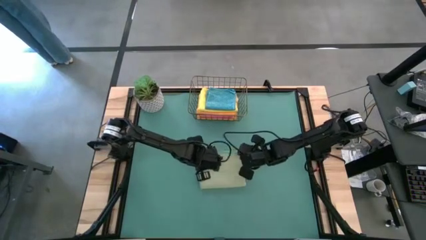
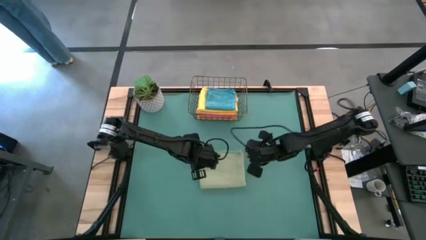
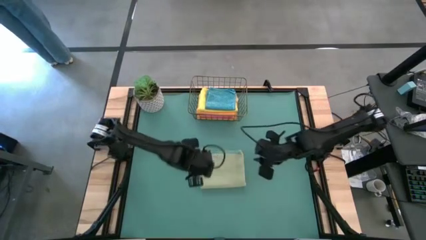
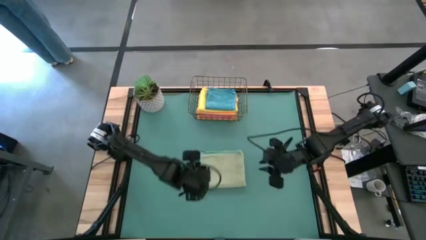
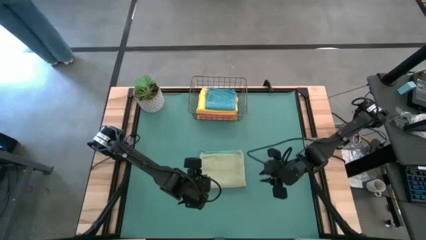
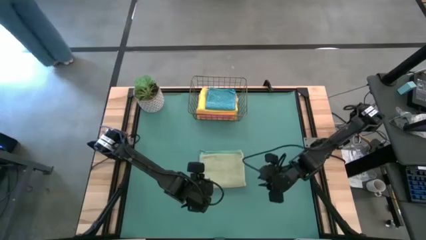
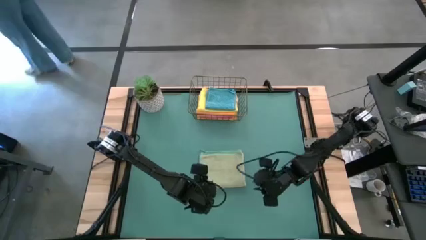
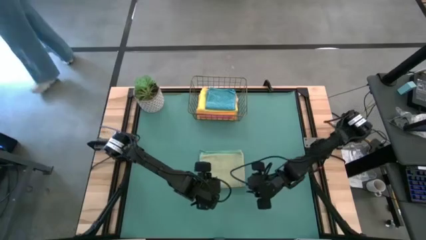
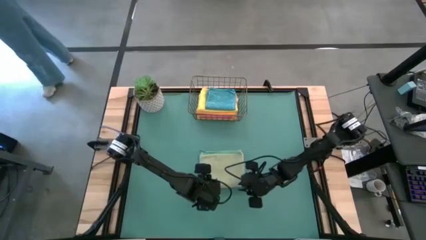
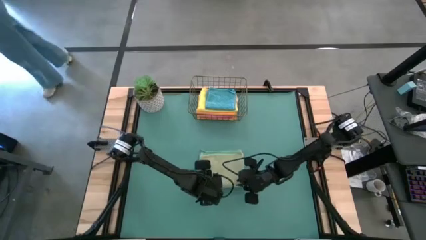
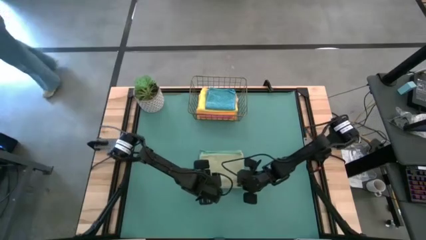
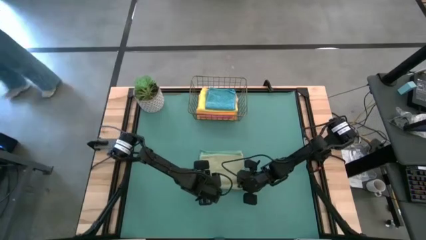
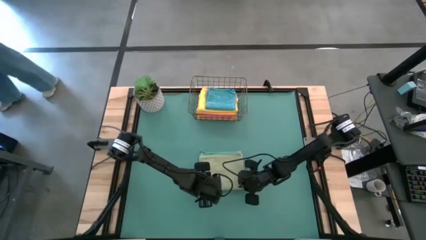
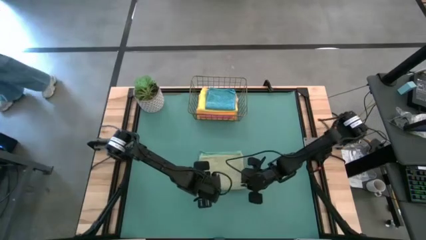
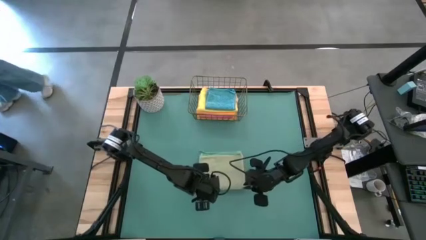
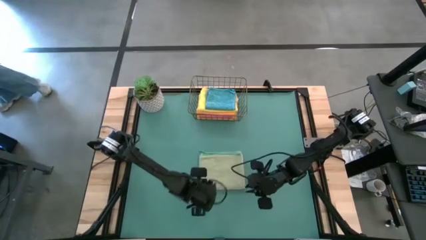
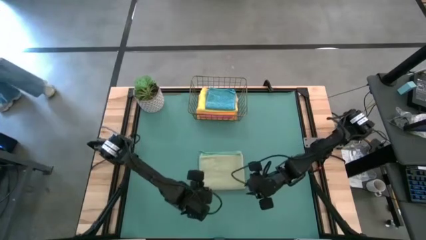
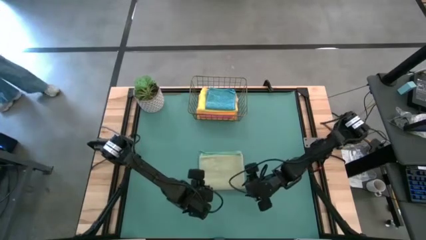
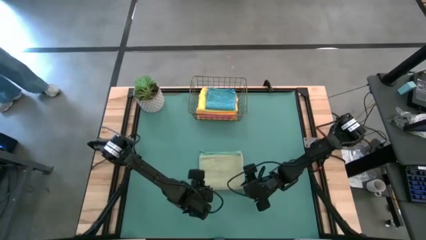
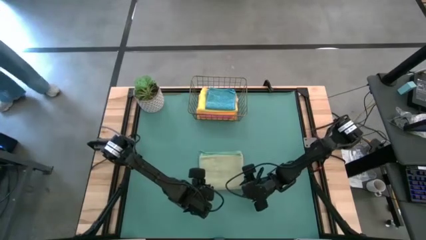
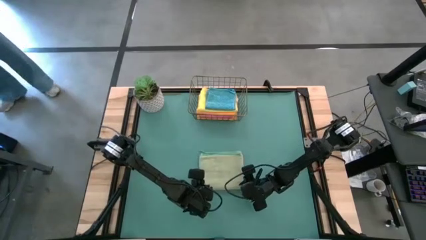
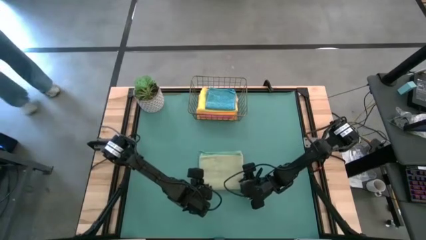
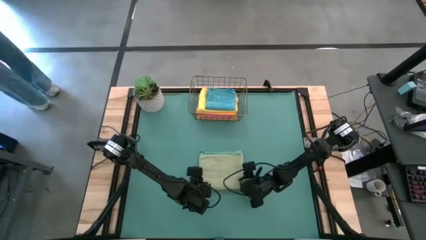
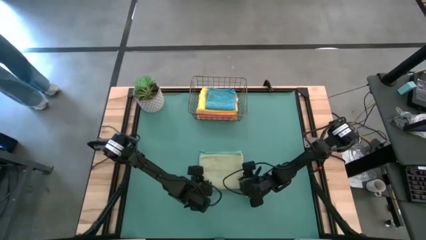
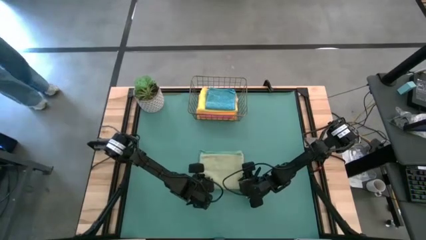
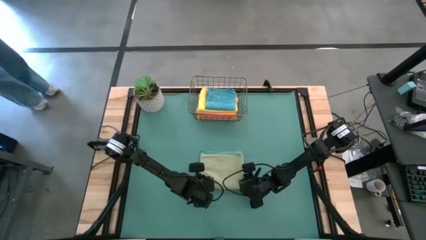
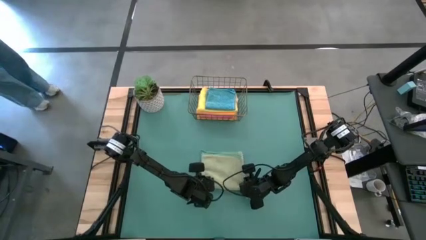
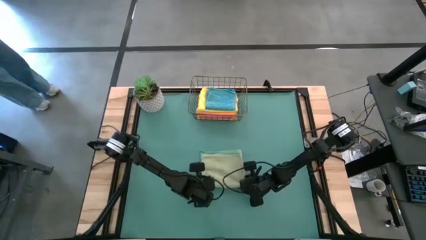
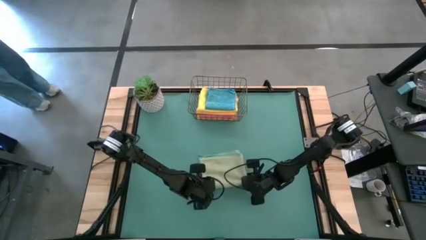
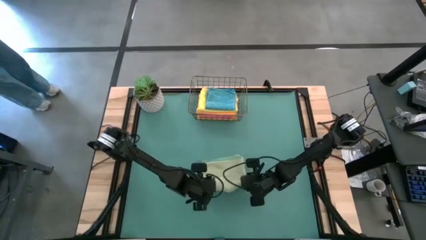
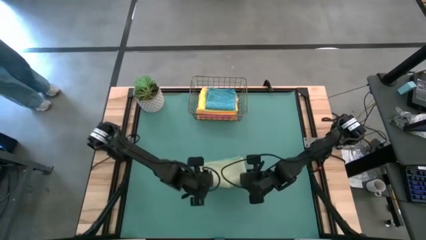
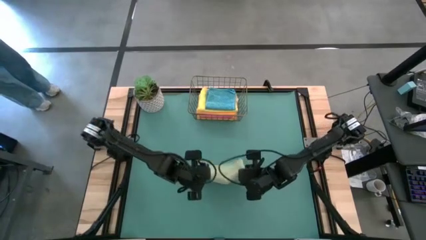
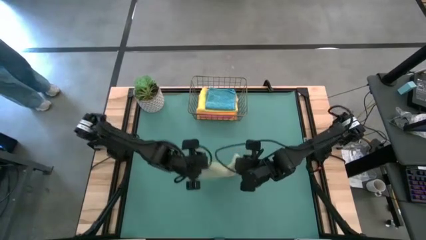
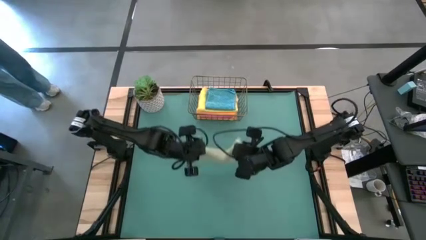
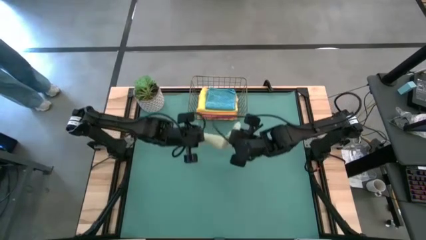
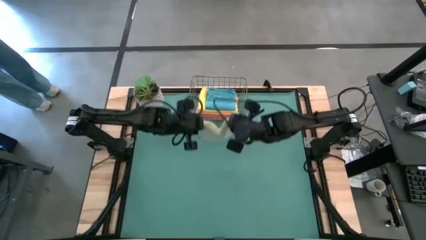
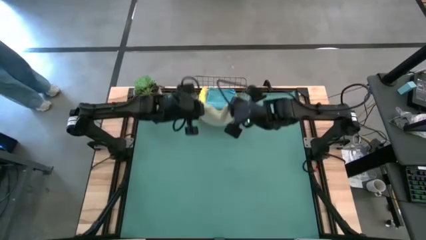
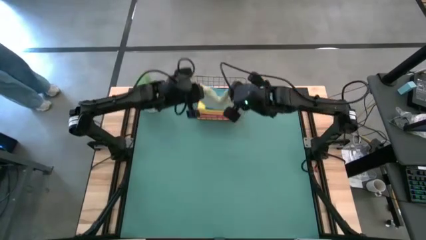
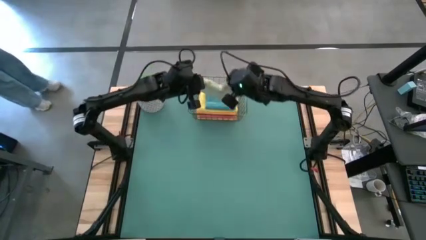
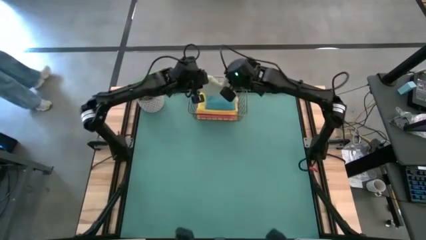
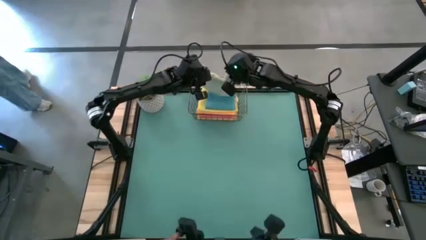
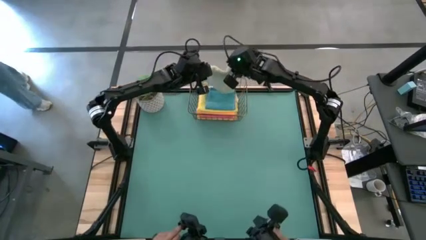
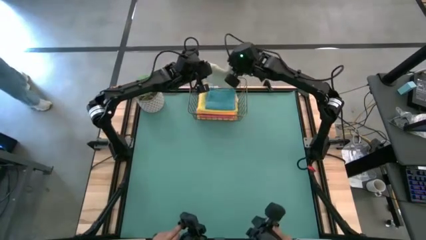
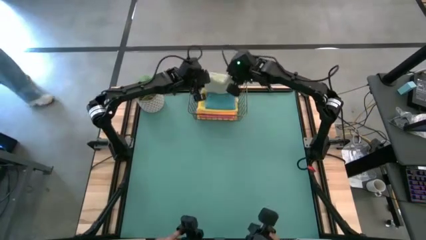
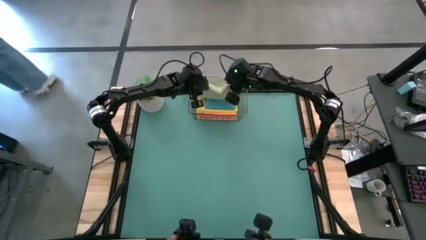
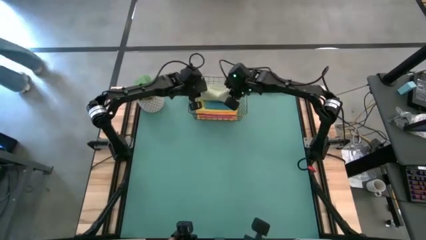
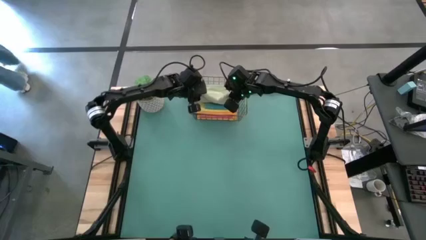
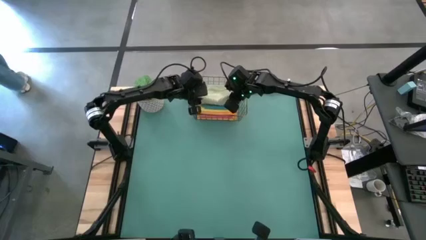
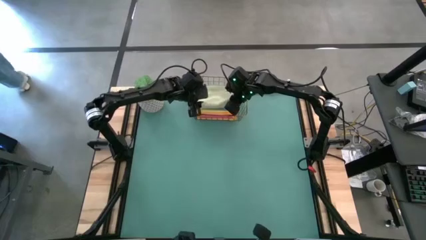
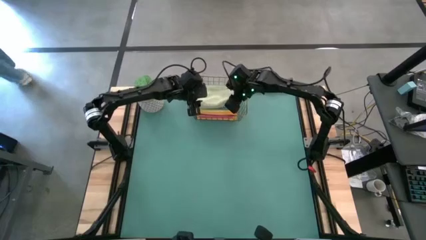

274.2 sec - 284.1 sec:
Task: Fold microfiber towels
Put the folded green microfiber towel into the wire basket

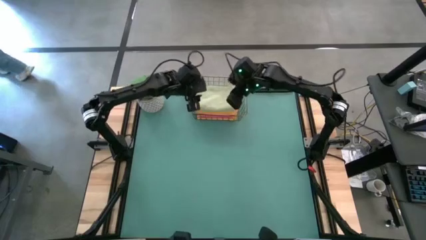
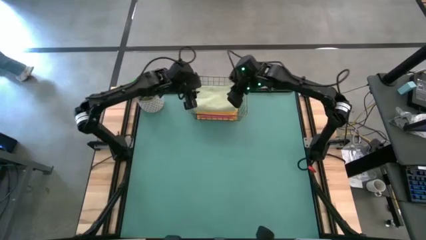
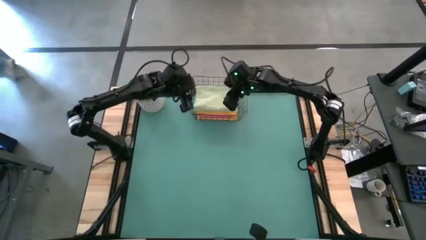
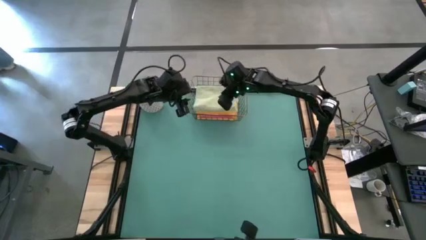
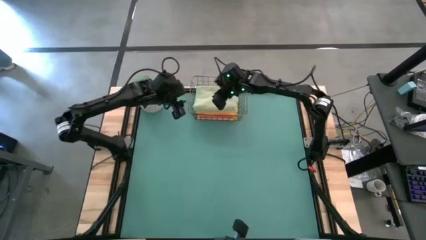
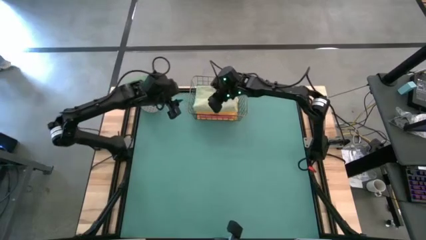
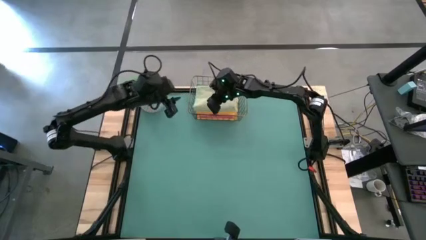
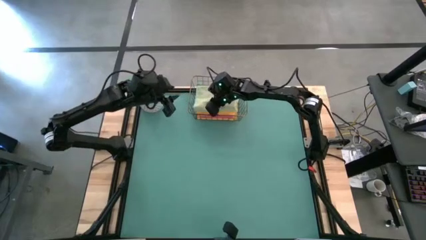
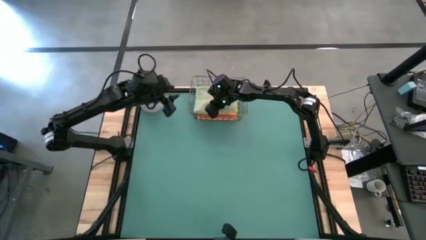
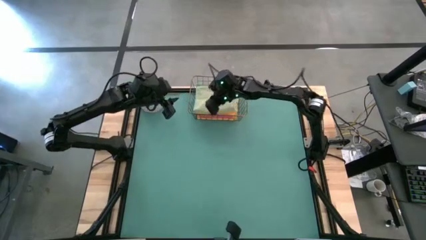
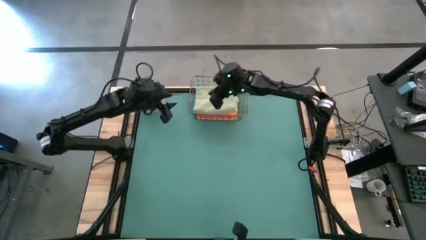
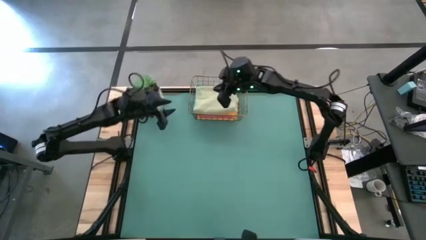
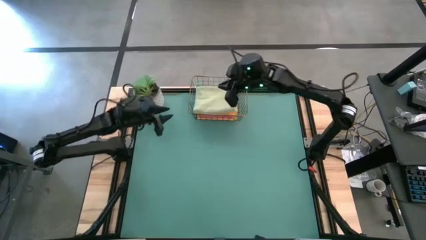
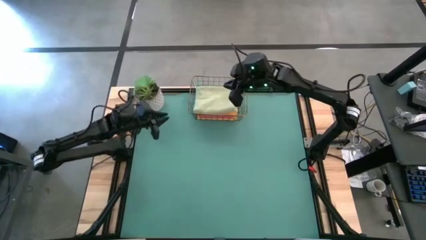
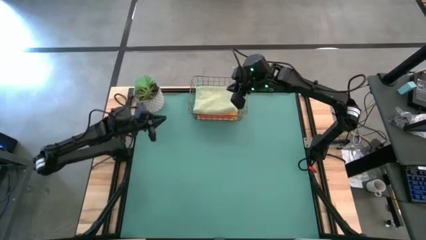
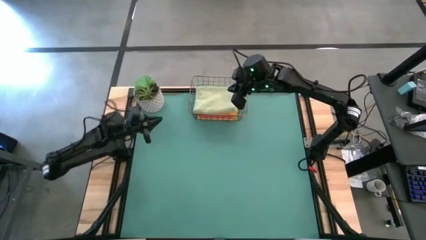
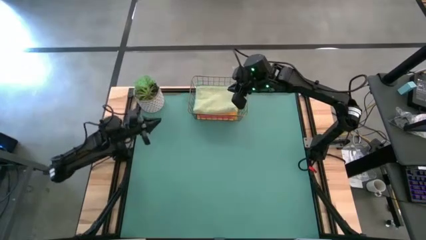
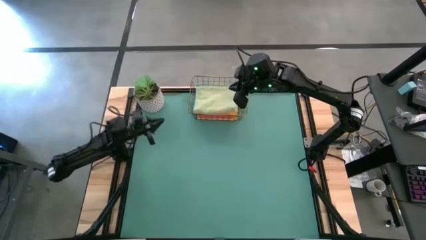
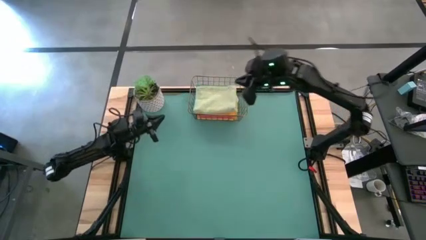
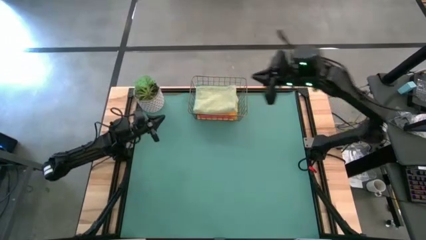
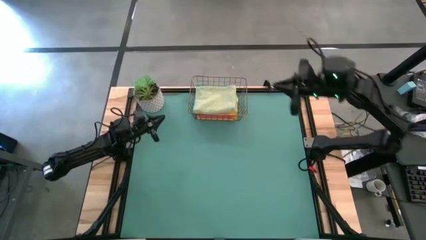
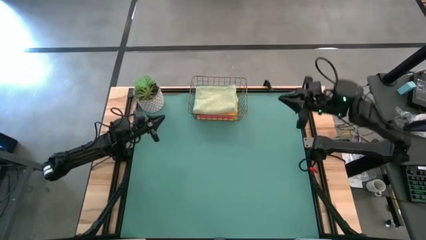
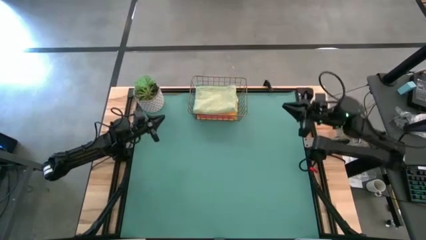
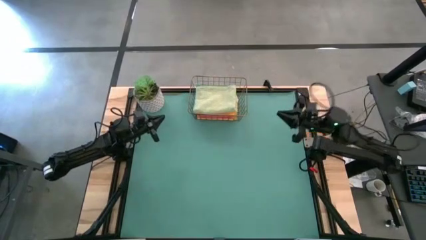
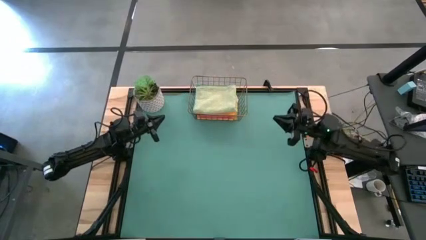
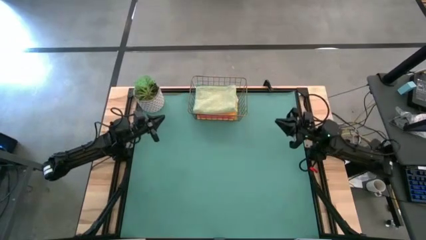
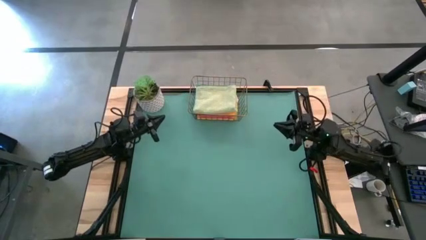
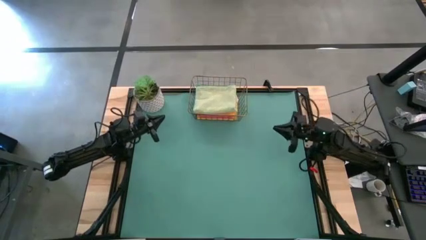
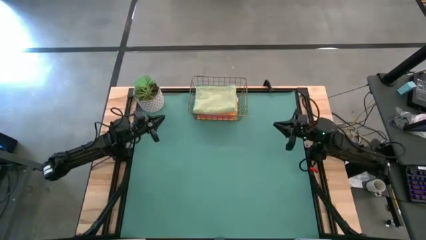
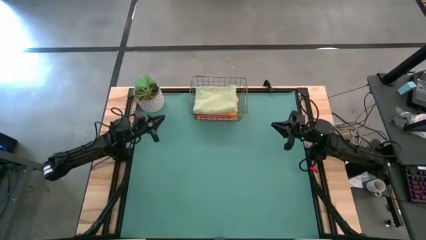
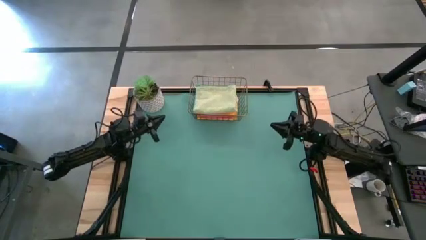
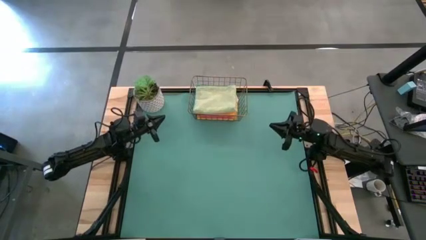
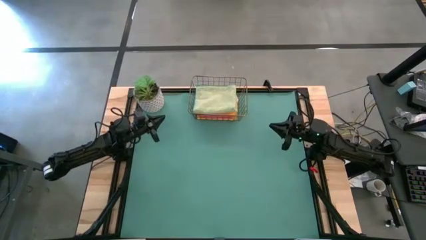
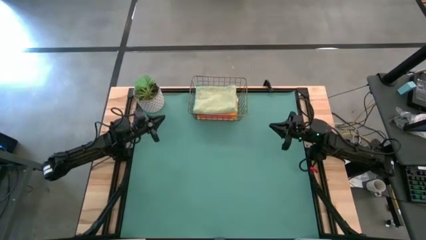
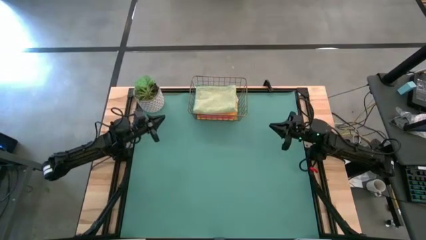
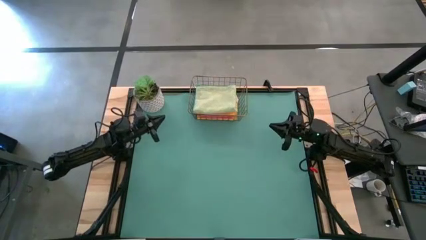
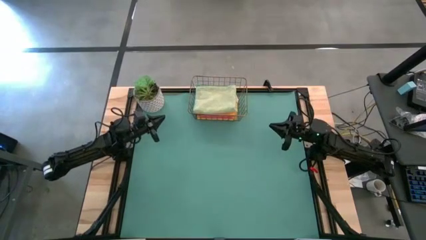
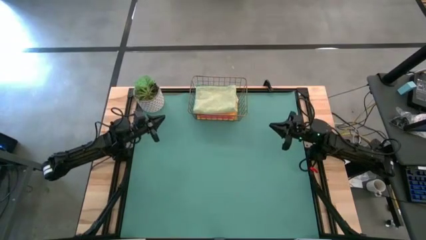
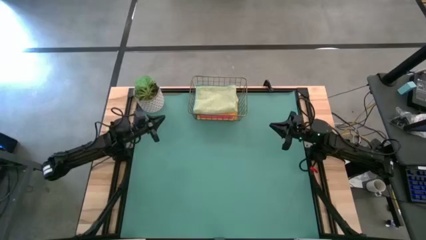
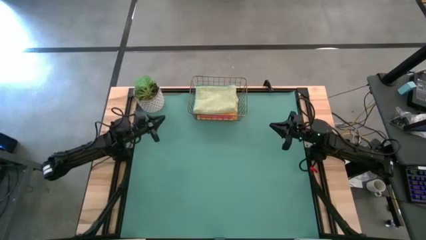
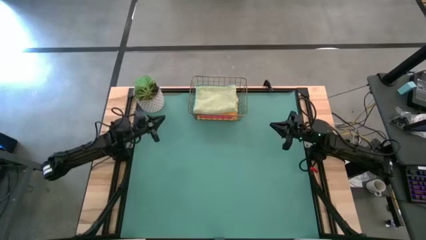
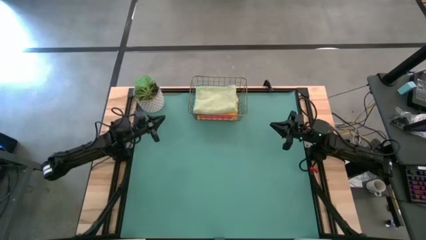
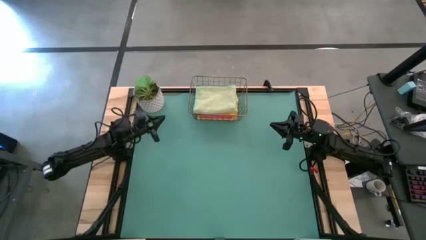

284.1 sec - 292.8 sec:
Return to Home Position
